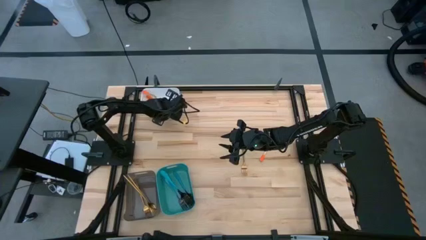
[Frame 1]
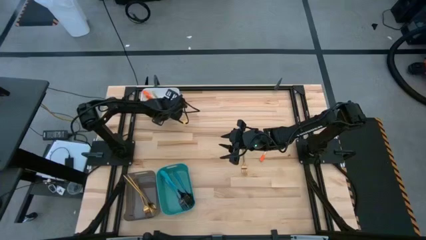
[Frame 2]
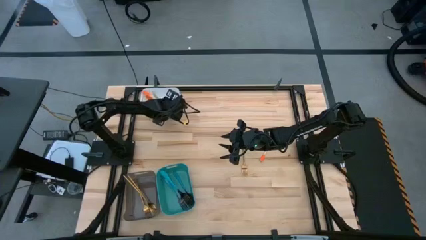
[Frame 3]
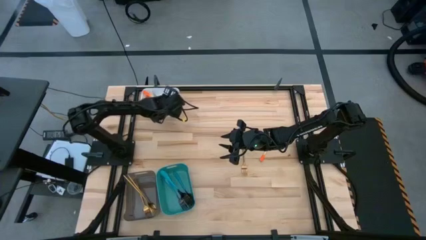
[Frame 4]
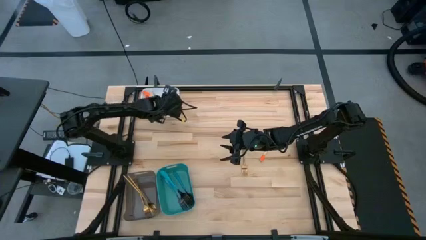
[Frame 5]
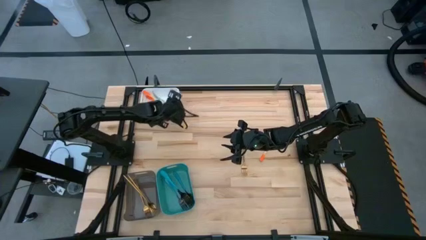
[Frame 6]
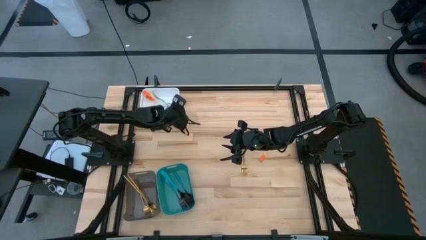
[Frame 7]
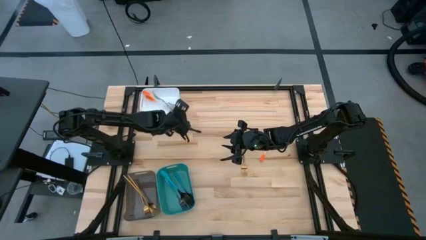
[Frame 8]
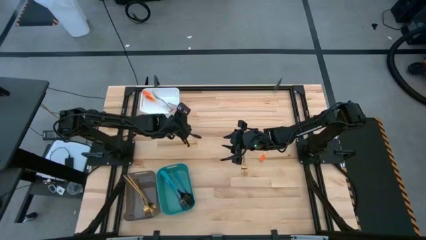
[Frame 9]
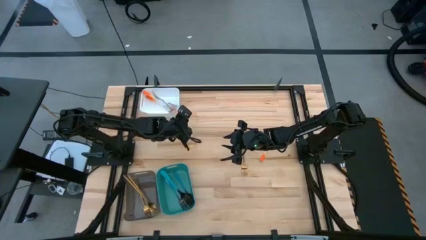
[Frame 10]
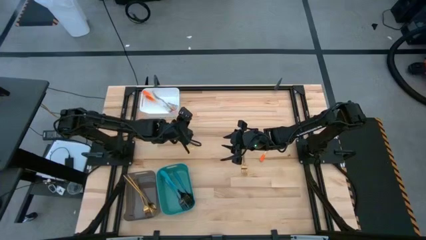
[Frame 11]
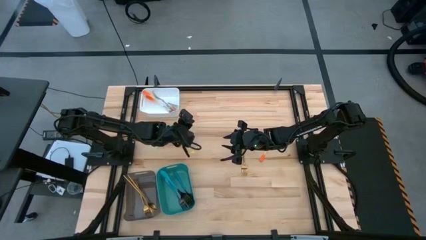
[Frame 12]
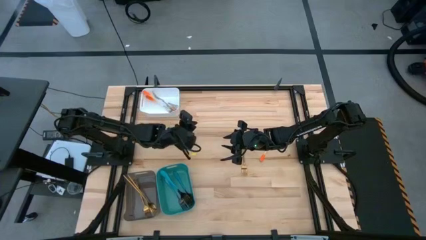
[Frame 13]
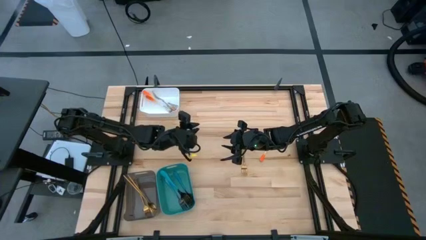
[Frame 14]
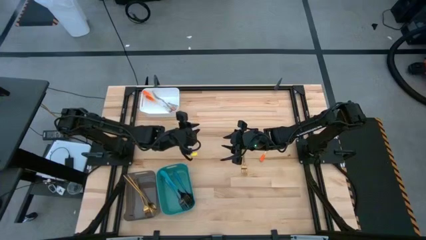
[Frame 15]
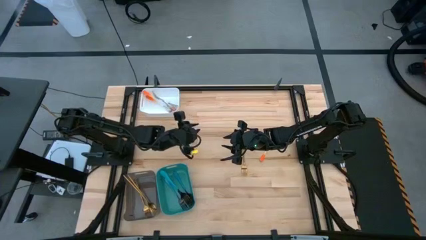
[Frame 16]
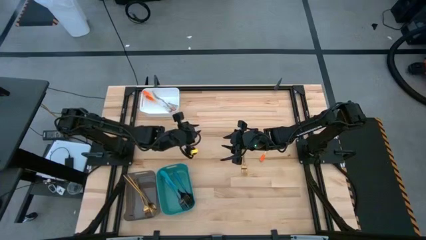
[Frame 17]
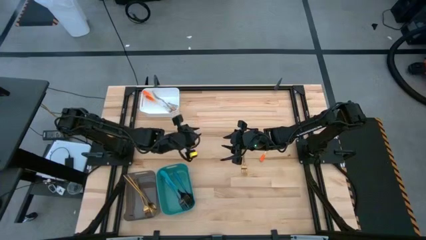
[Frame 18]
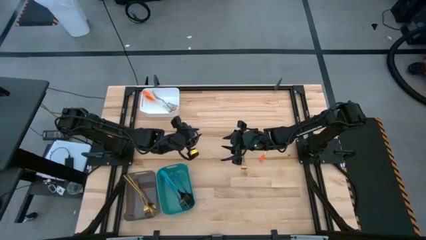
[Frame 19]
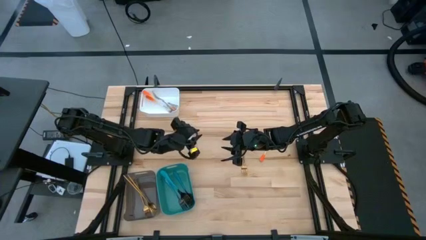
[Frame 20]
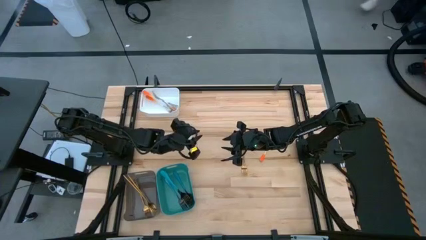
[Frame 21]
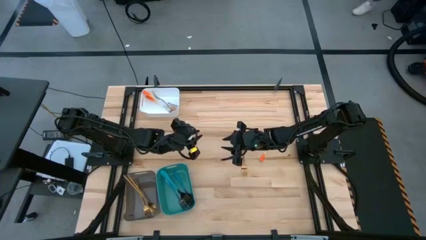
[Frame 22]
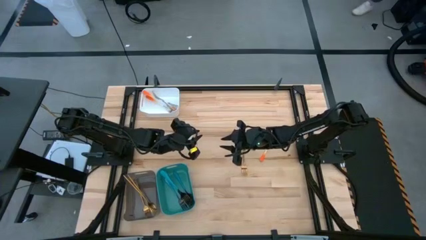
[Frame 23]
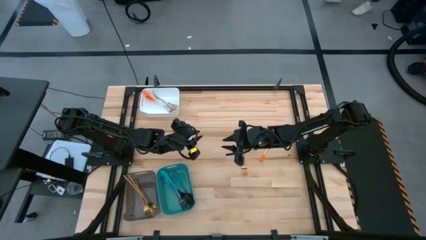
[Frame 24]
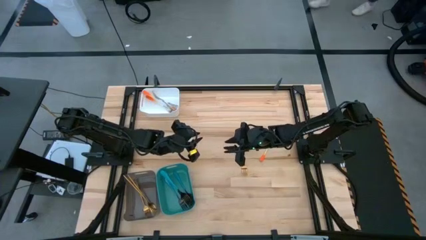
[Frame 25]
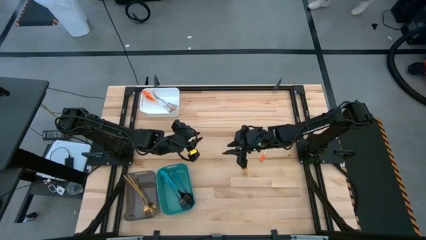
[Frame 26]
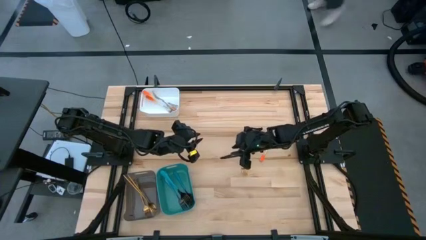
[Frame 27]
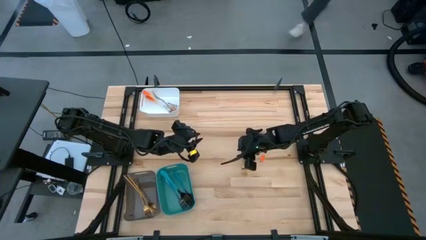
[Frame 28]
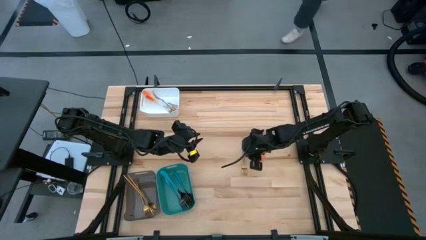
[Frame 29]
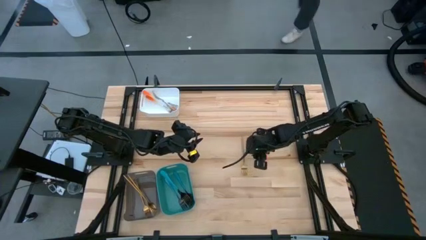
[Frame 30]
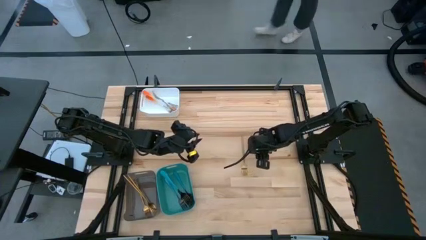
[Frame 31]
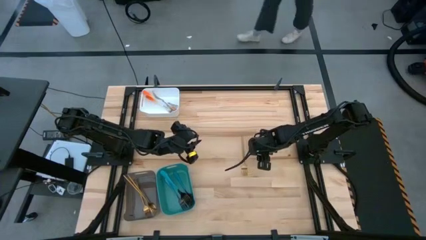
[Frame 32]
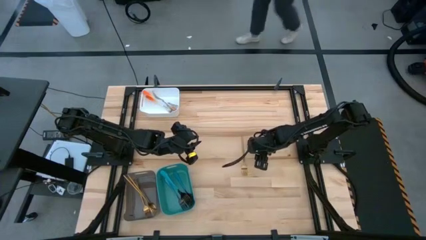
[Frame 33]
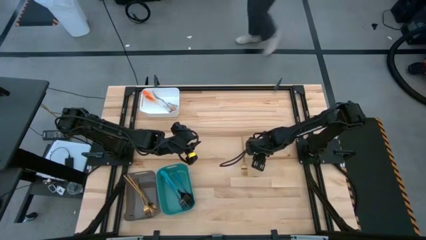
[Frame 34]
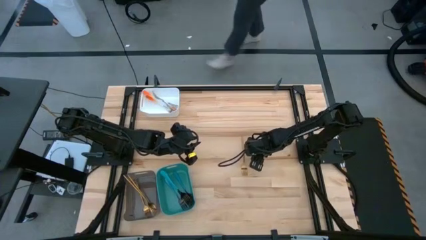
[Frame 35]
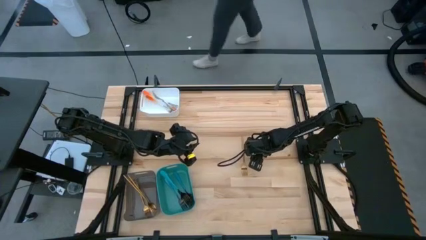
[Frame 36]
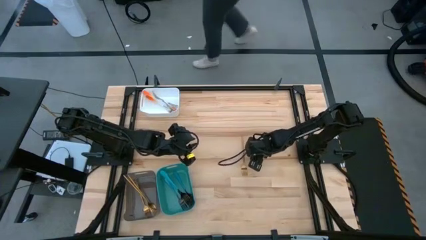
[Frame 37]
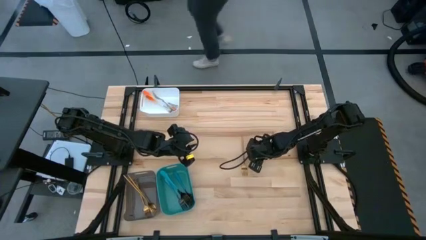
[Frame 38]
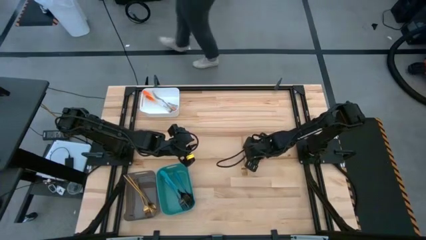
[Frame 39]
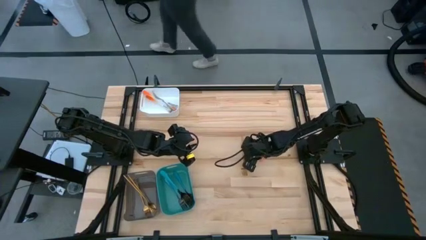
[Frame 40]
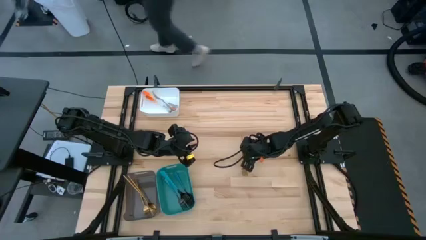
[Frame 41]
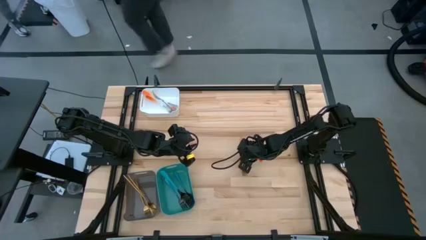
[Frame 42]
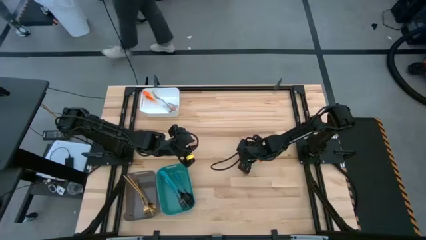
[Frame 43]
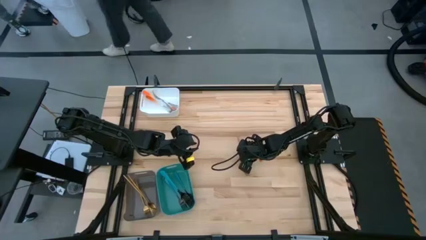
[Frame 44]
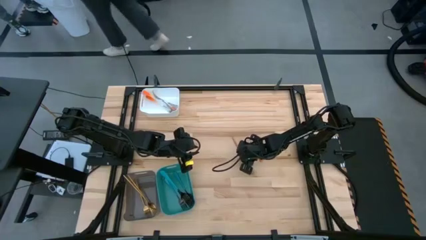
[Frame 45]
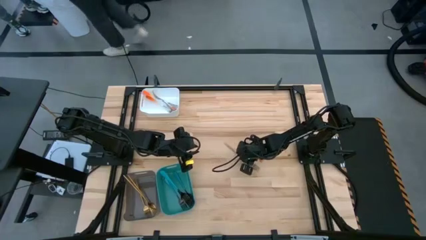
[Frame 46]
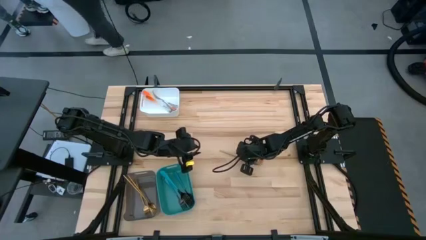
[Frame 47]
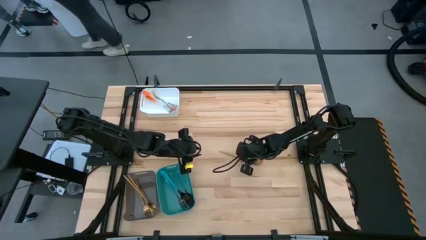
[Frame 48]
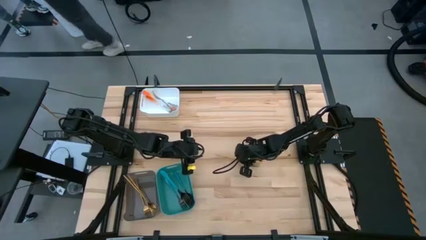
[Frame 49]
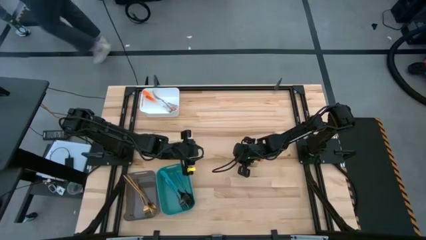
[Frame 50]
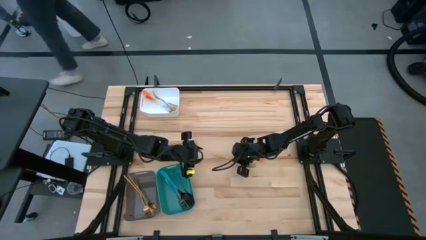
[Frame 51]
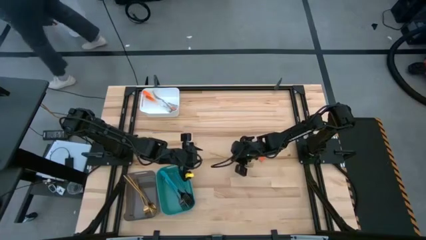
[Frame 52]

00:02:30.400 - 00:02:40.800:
Task: Sort silverware by color (type)
Put the gold fork into the black bin

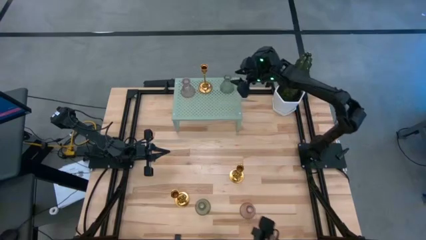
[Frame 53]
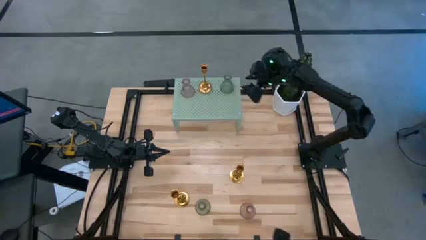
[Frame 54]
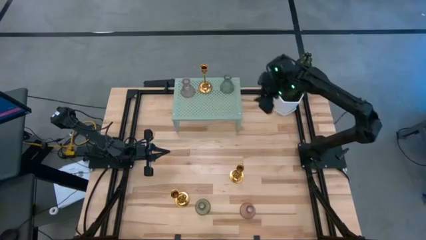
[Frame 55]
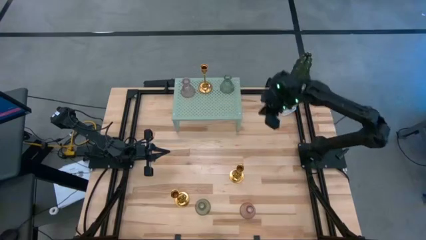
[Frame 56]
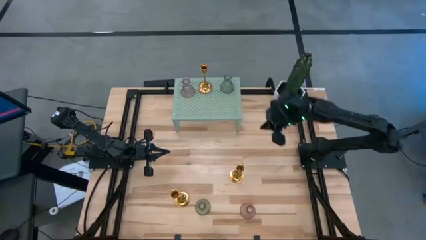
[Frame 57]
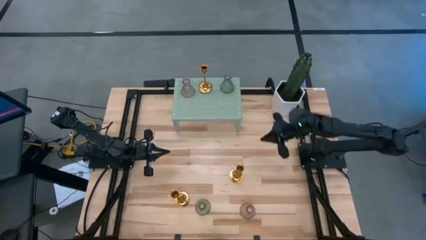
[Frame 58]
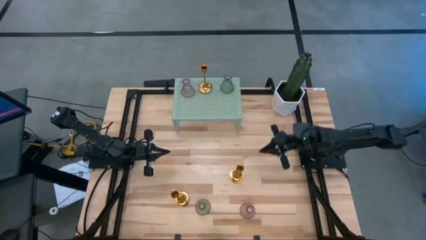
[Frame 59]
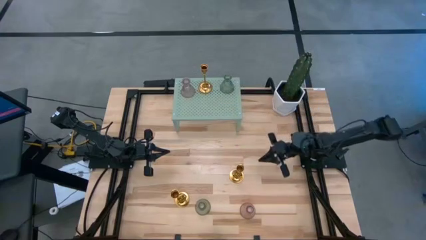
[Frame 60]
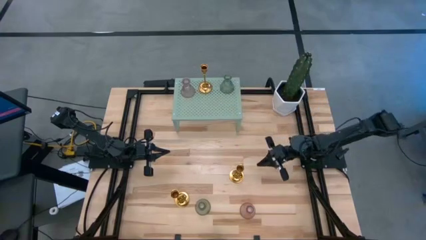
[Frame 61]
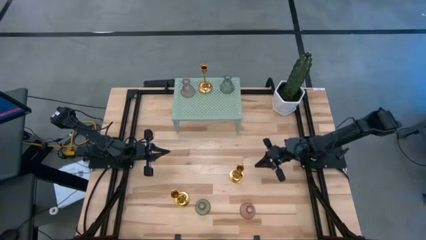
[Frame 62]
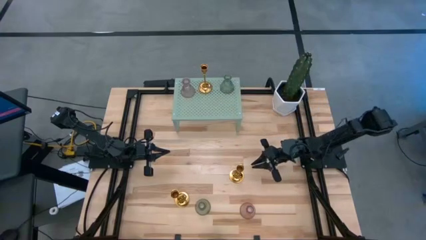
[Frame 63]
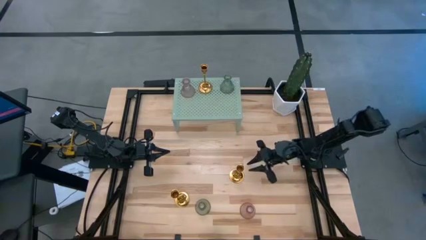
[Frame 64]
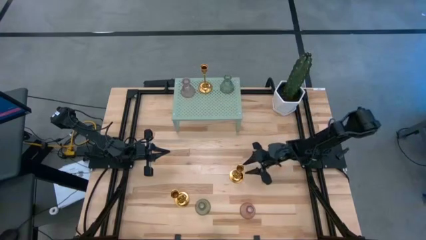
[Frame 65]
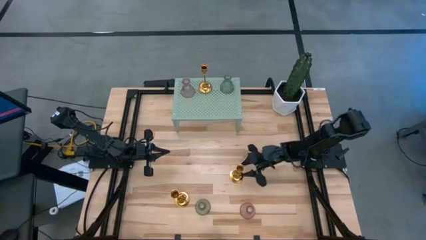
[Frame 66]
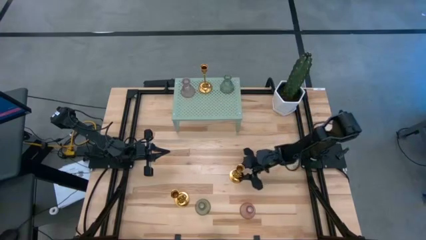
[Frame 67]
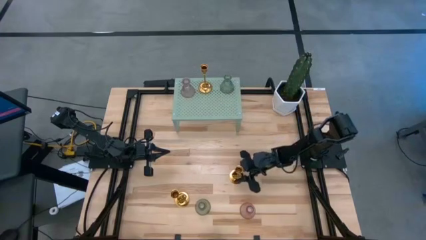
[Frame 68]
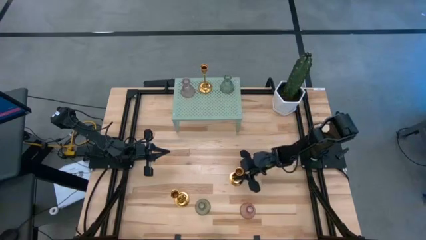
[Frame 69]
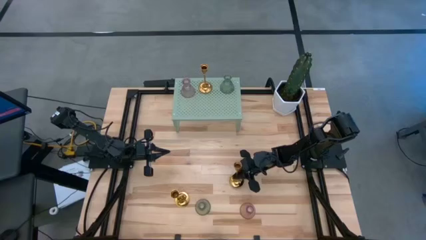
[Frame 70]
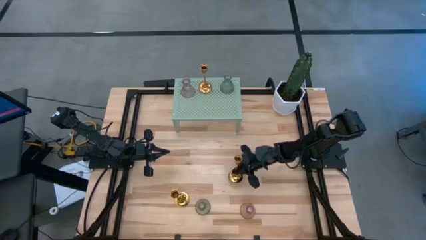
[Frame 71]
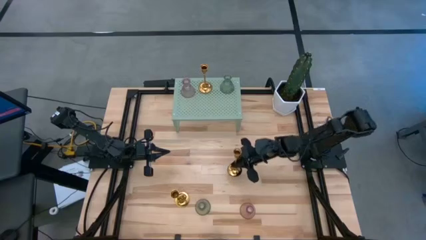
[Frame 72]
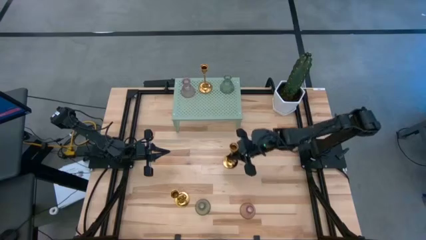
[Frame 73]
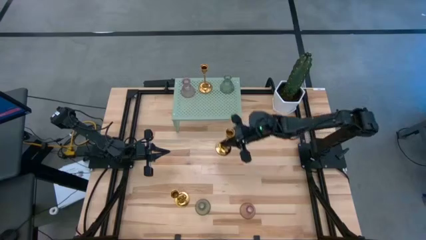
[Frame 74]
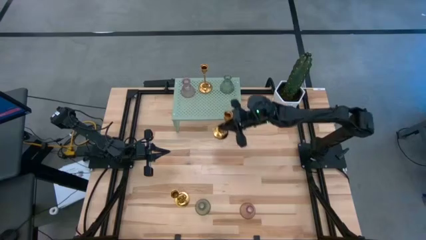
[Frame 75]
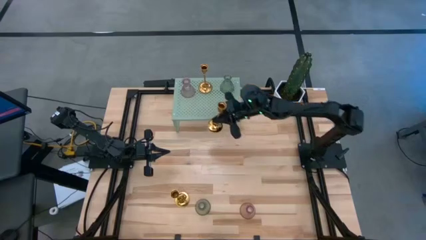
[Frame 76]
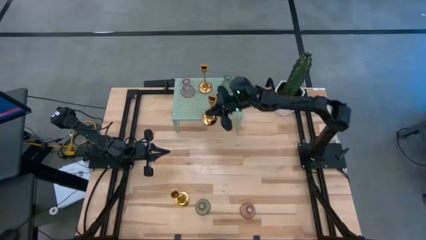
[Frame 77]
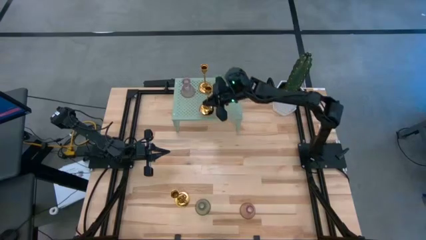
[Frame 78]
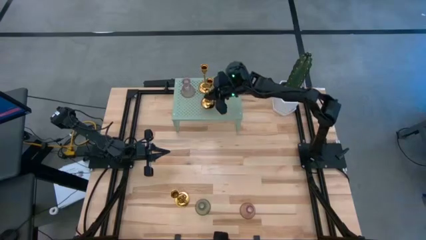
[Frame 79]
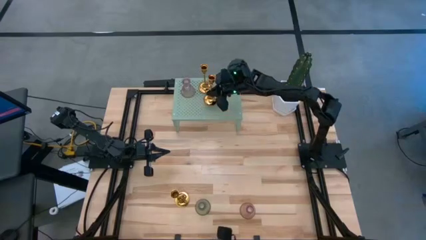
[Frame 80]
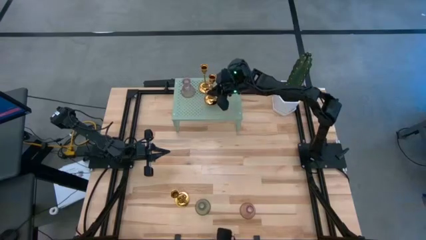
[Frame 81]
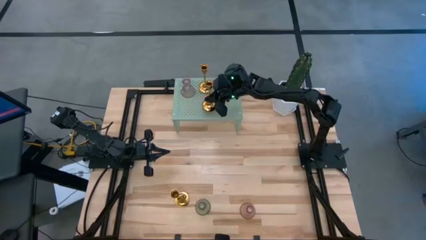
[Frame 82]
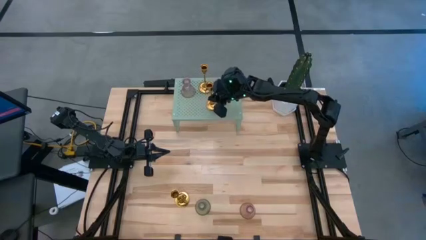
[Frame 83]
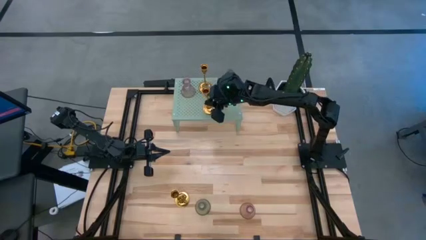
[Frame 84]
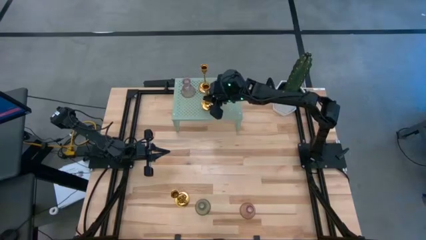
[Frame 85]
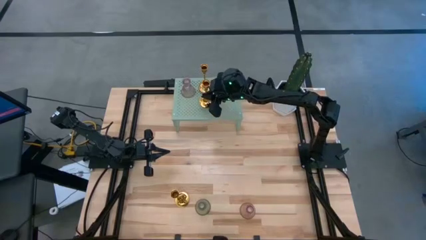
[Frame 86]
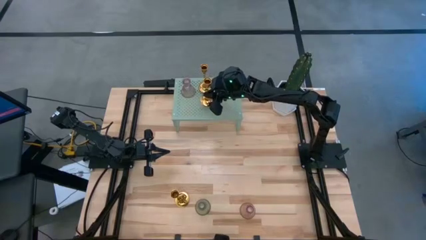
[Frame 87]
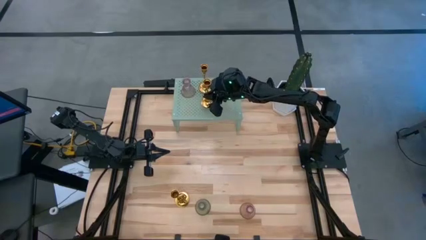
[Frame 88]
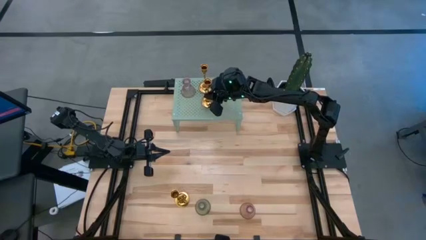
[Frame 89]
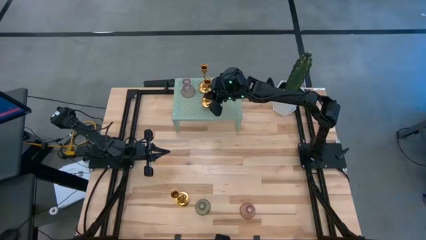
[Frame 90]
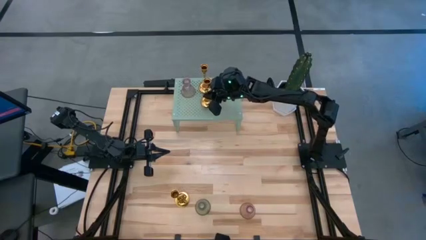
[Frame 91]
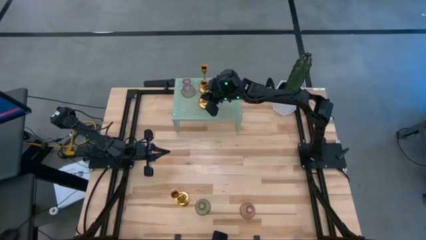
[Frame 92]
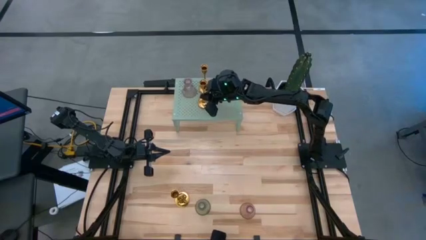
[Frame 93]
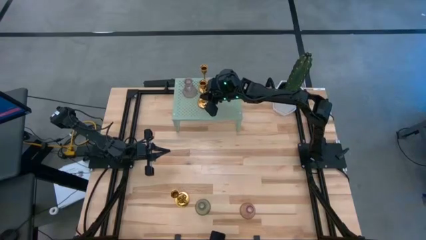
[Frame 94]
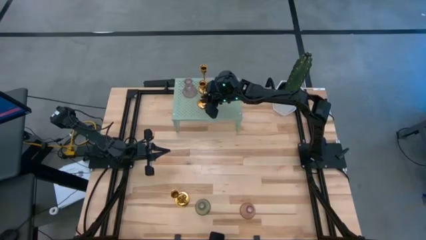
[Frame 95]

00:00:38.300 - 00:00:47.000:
Task: Pick & Place candle stick holders
Put the right gold candle holder on the shelf
